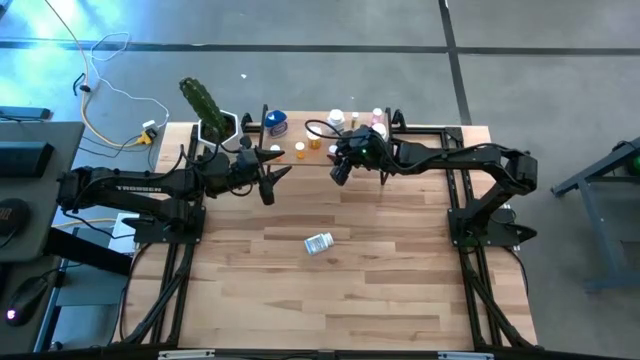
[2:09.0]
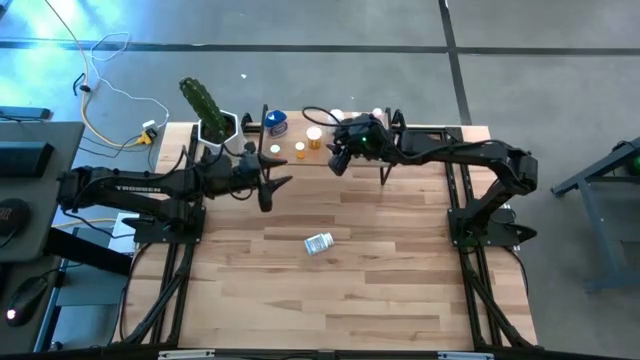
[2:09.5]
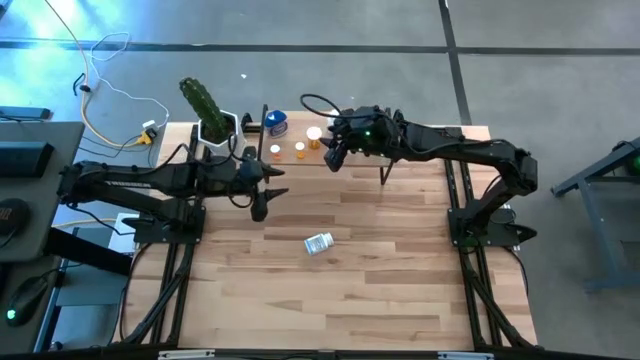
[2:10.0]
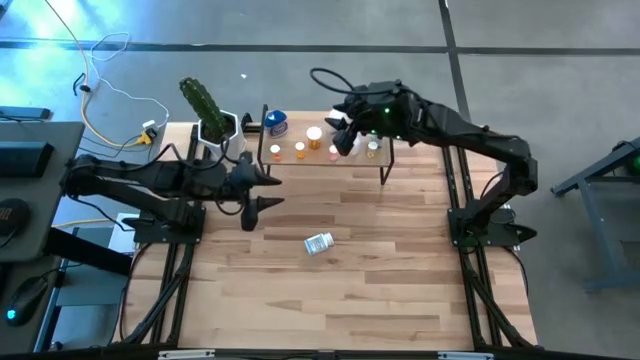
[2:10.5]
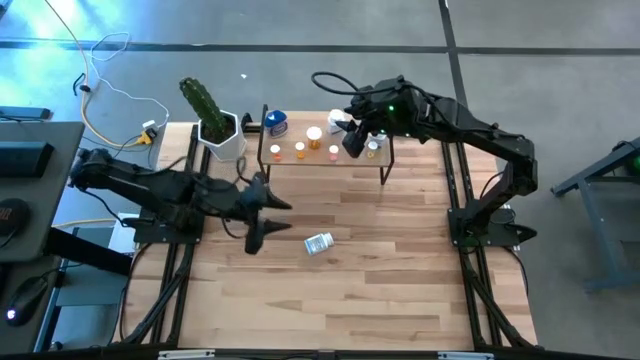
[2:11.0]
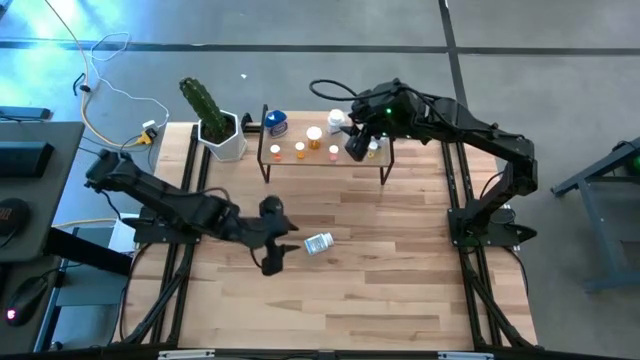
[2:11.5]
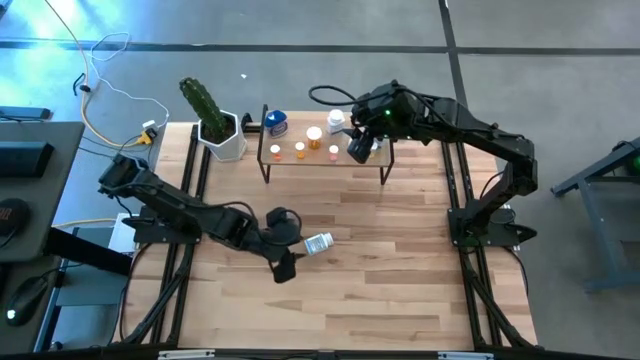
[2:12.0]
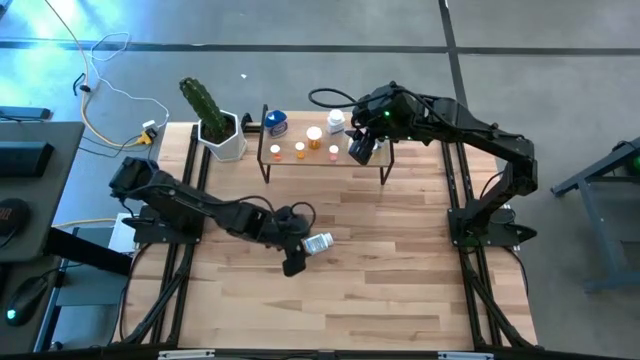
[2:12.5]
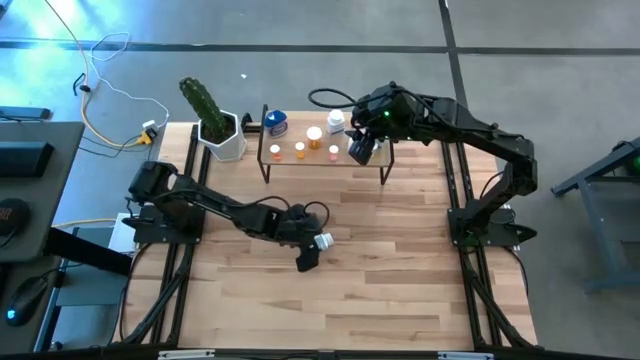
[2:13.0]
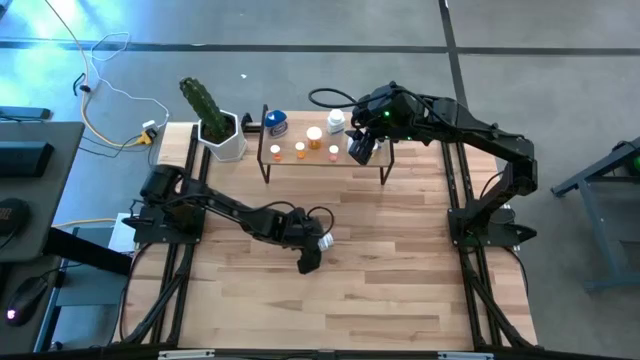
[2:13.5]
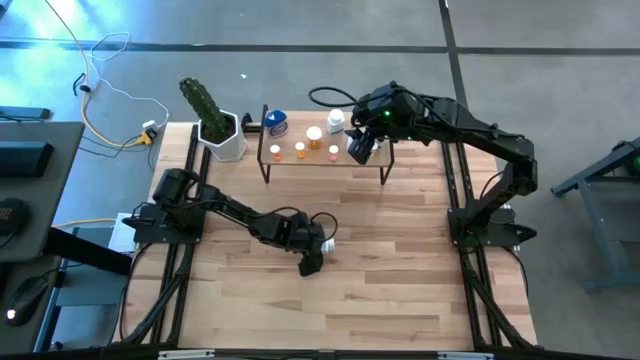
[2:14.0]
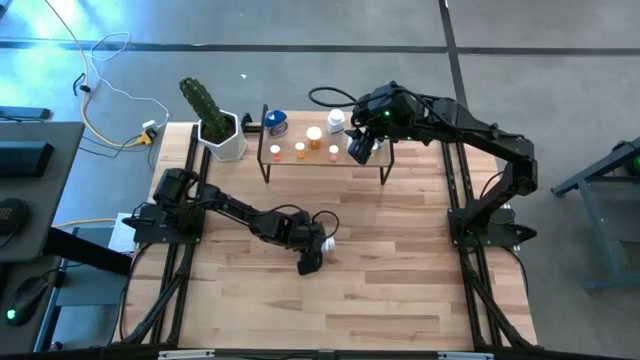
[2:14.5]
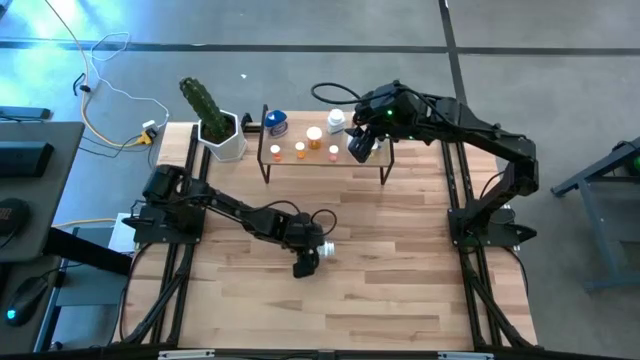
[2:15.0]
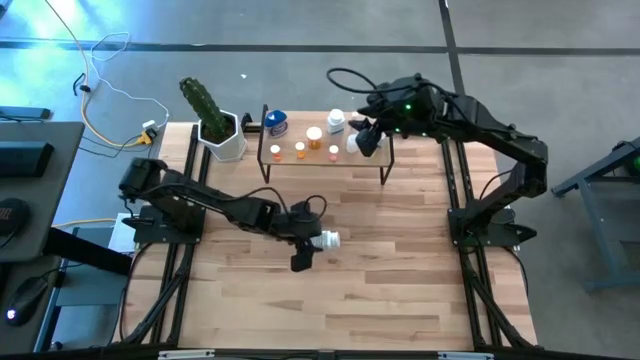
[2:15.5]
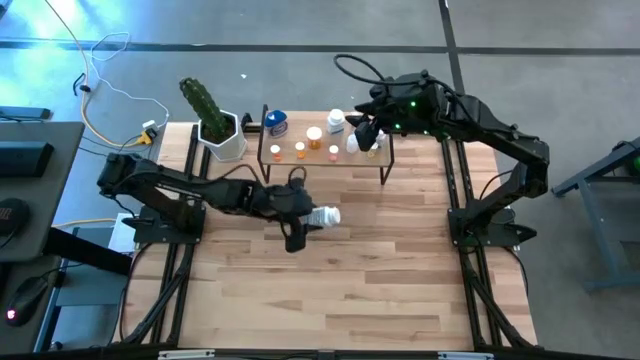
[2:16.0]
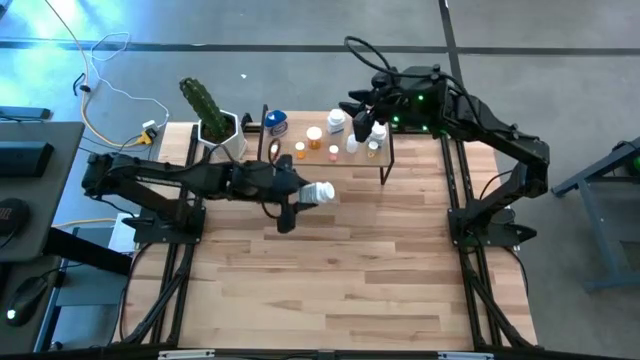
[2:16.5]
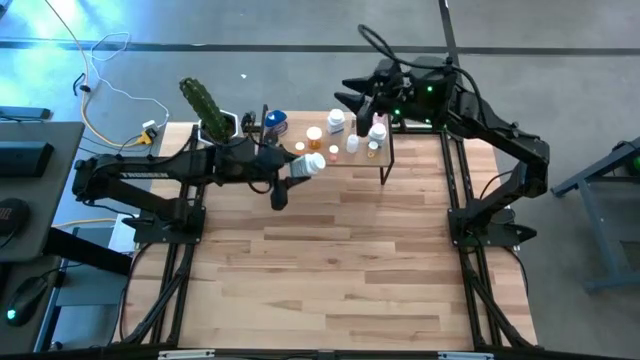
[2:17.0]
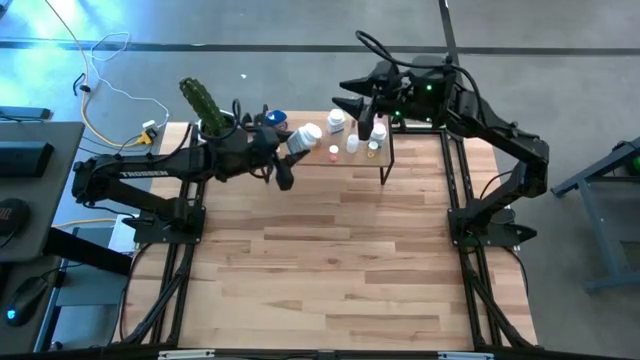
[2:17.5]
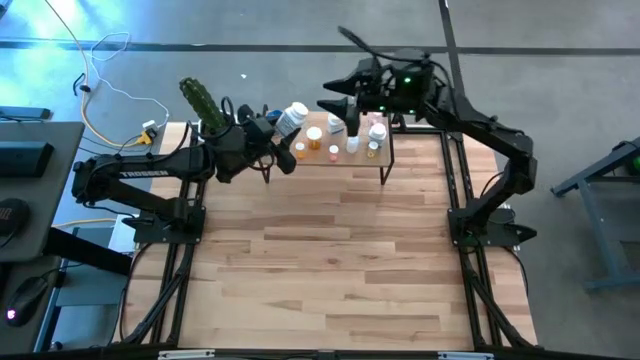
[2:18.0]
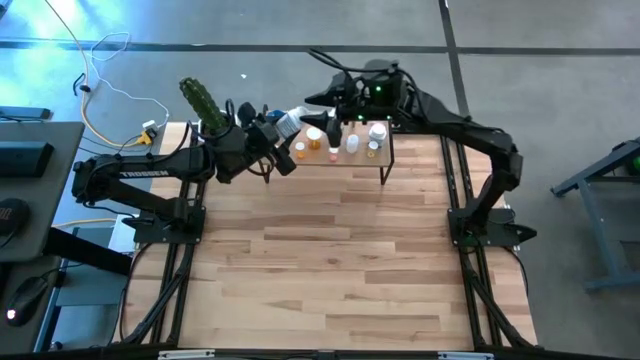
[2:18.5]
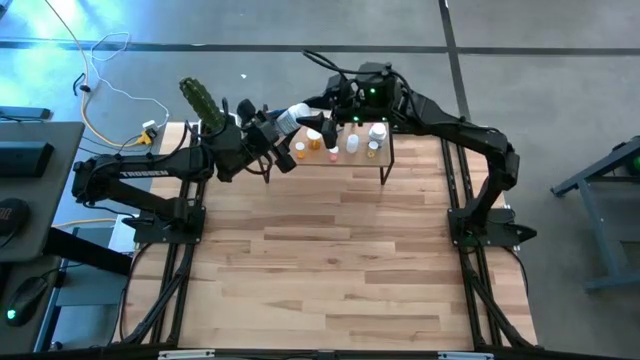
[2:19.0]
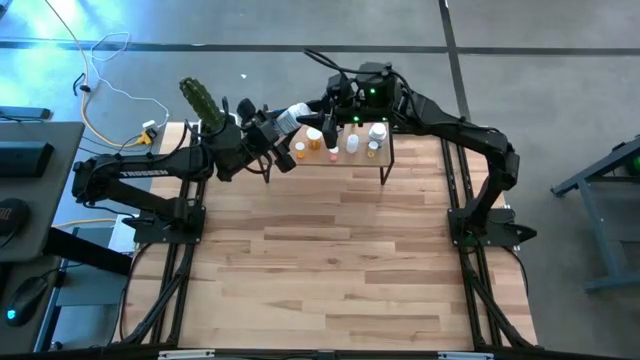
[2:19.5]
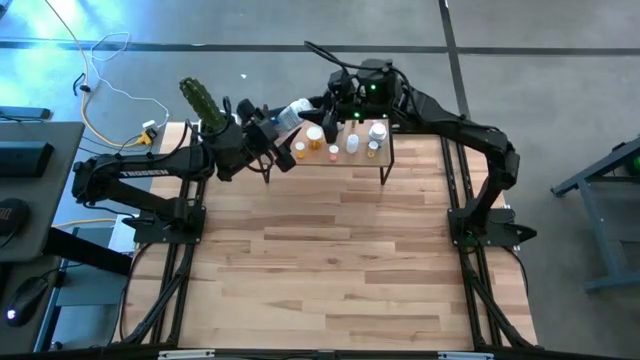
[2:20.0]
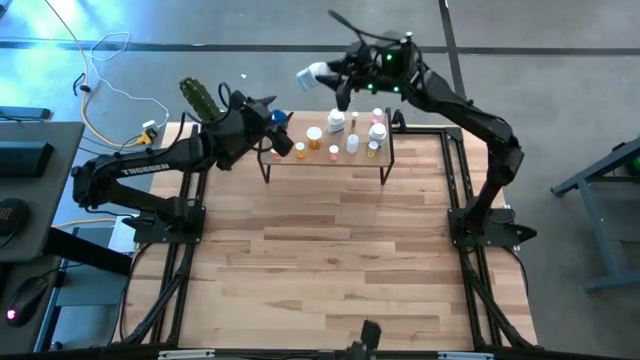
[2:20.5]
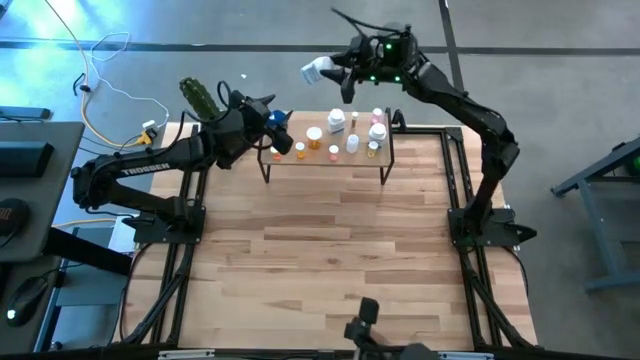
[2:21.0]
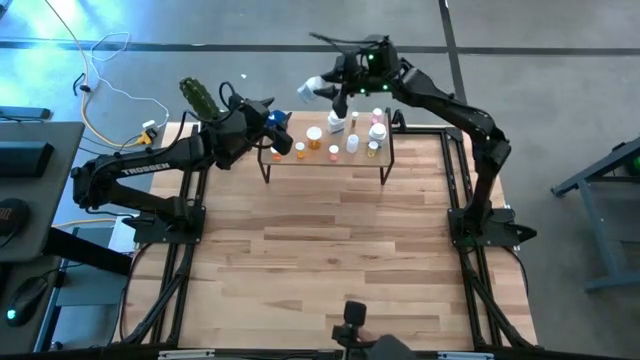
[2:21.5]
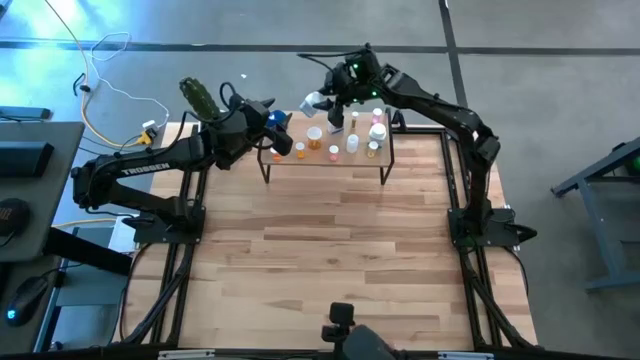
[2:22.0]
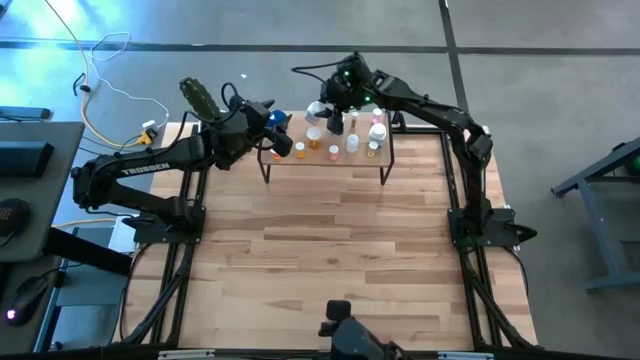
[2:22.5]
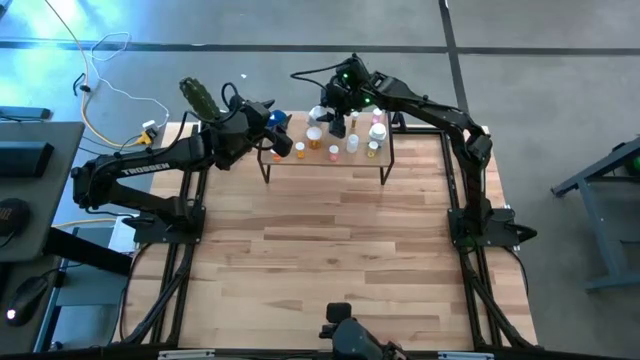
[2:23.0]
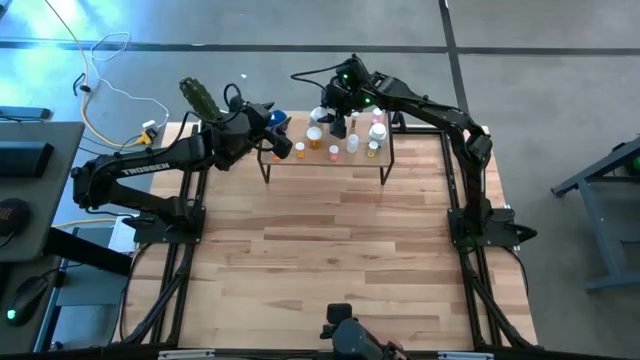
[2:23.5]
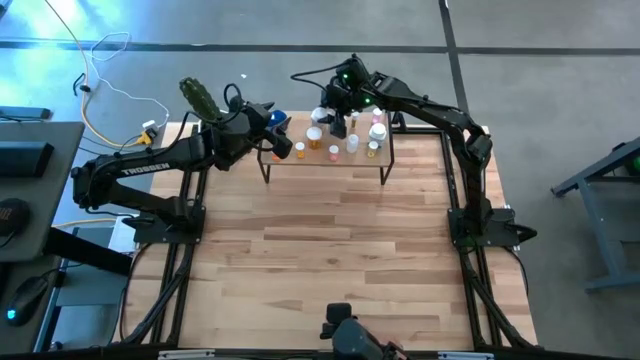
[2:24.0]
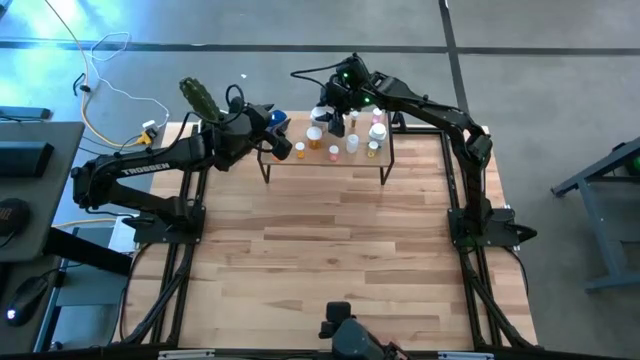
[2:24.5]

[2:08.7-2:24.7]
Task: Pick and place medicine bottles onto shelf by color
Put the white pill bottle on the shelf

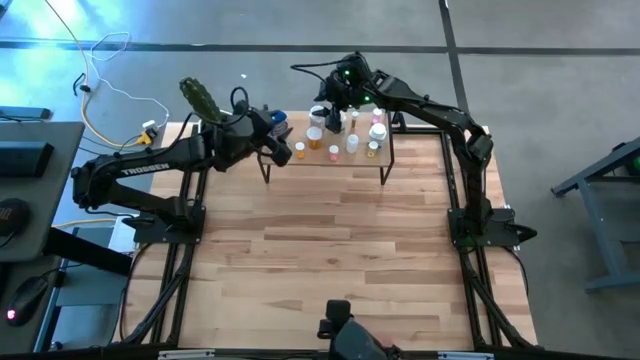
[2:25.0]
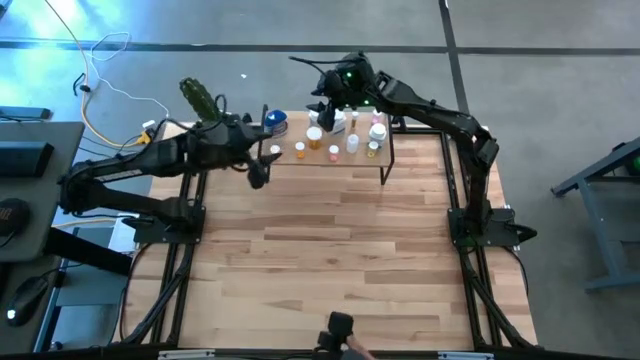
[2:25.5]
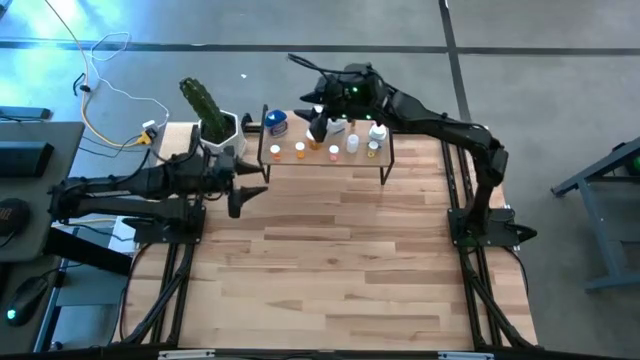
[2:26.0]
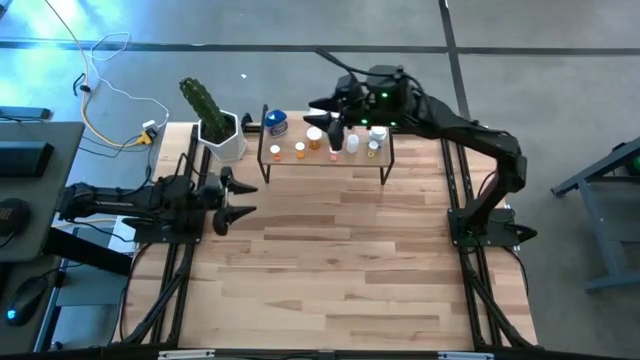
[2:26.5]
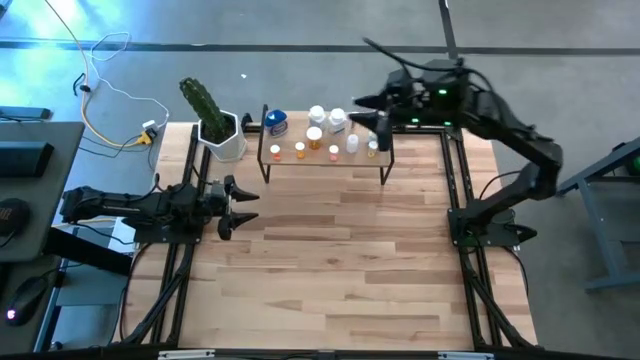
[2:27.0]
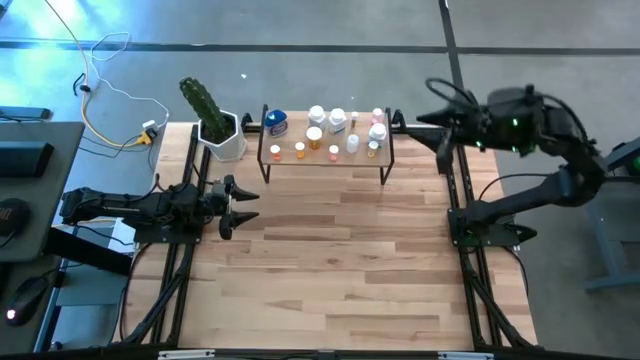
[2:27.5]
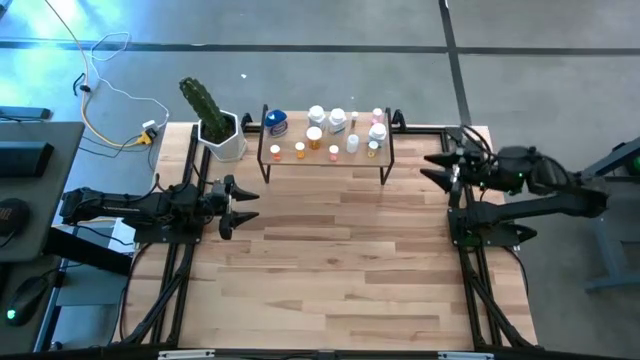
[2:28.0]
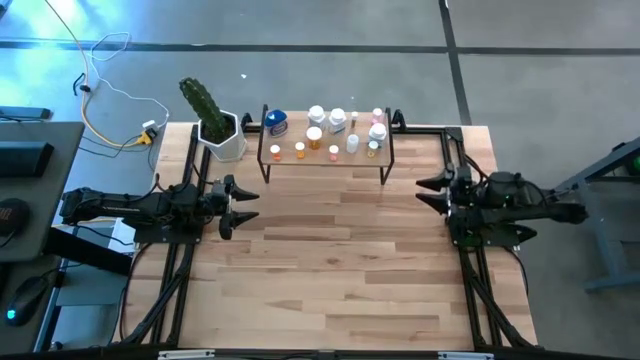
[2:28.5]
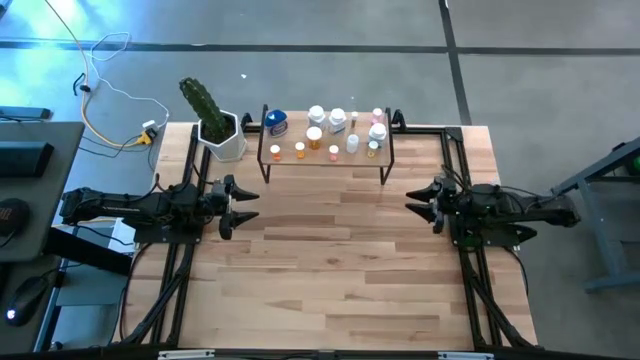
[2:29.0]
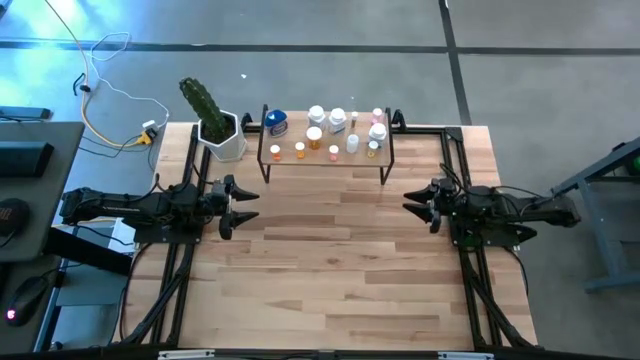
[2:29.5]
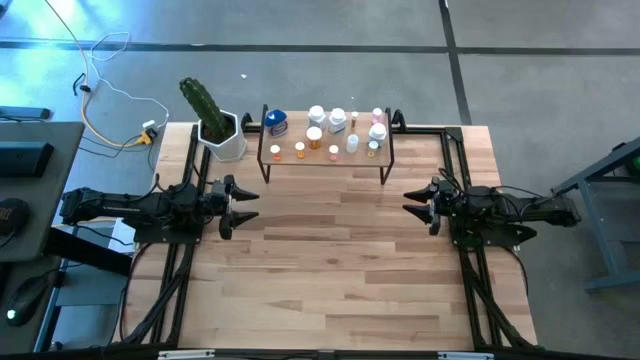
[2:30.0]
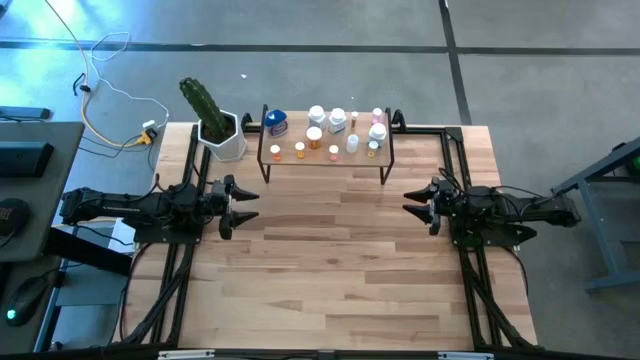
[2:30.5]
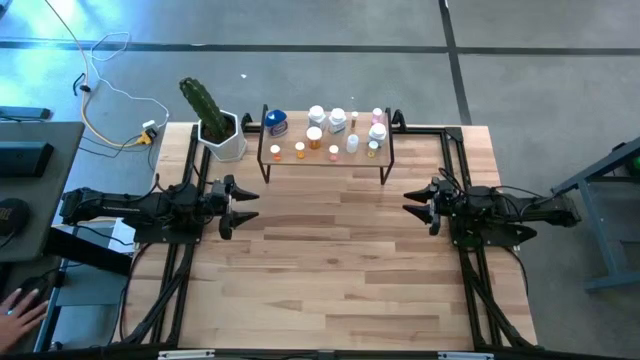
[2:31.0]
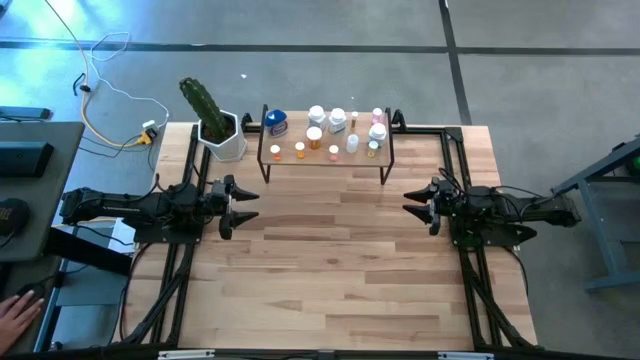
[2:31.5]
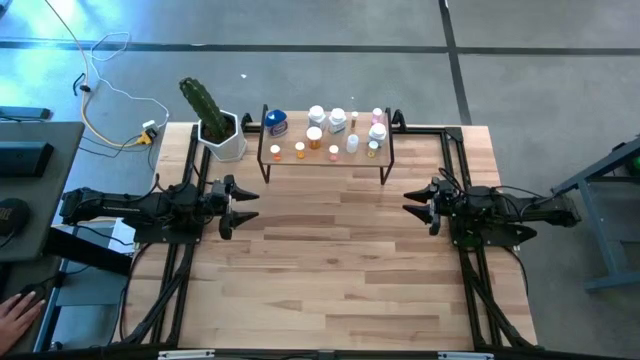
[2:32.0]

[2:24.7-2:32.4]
Return to Home Position
